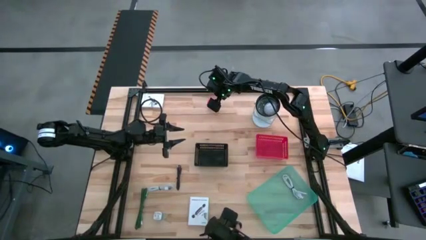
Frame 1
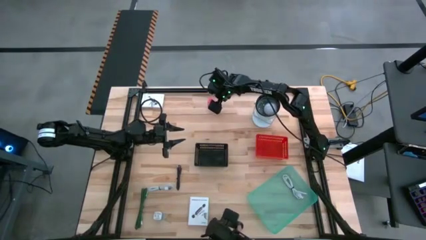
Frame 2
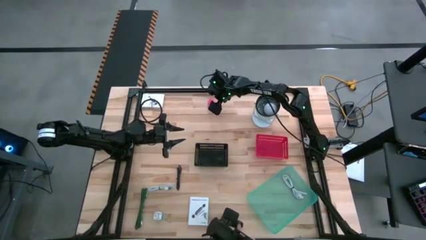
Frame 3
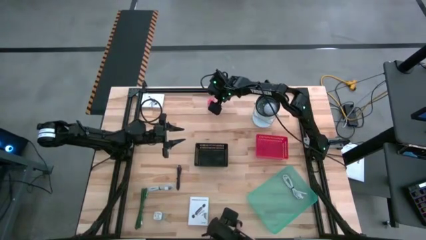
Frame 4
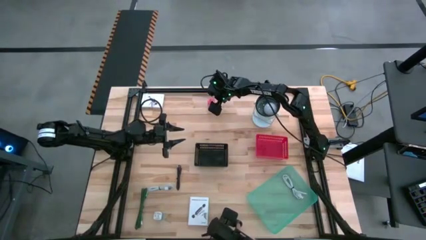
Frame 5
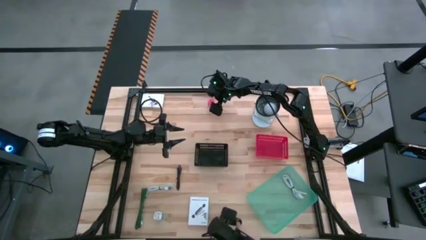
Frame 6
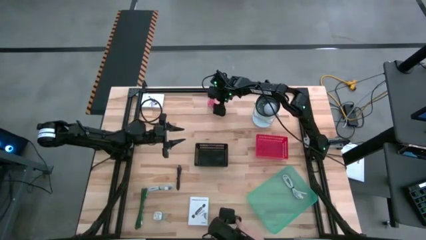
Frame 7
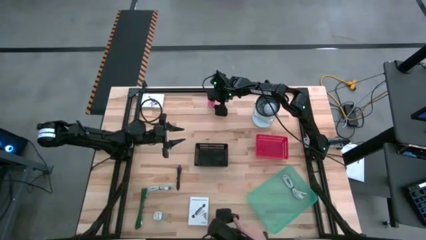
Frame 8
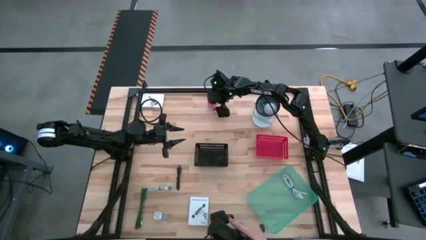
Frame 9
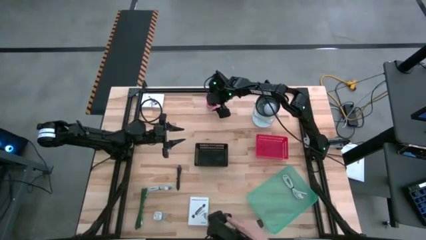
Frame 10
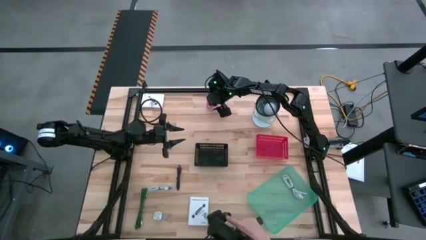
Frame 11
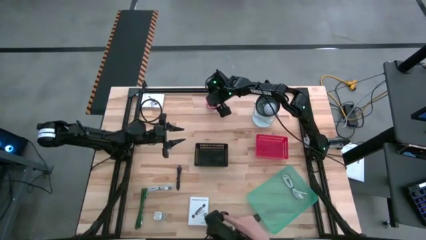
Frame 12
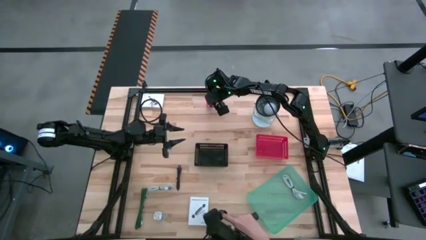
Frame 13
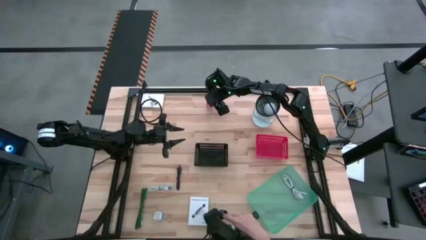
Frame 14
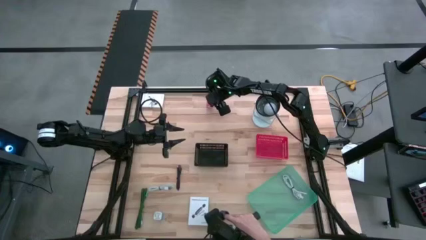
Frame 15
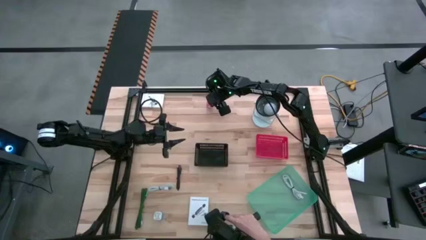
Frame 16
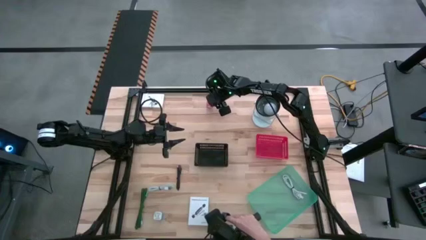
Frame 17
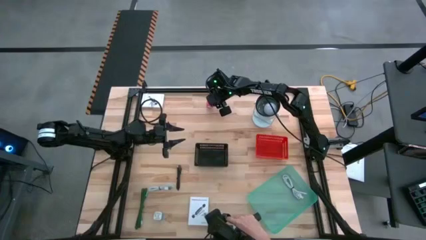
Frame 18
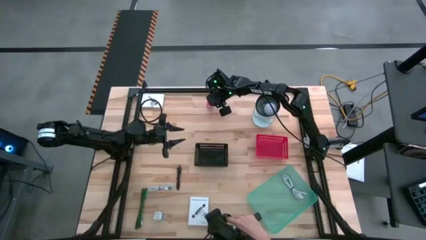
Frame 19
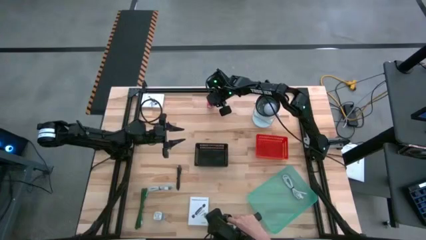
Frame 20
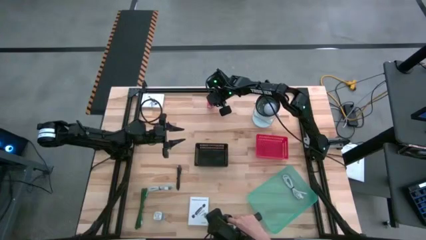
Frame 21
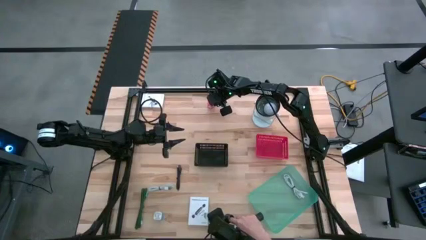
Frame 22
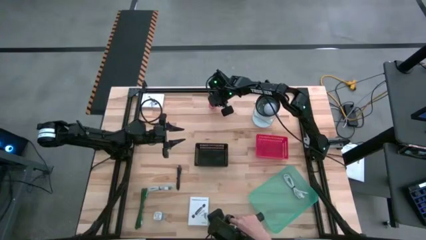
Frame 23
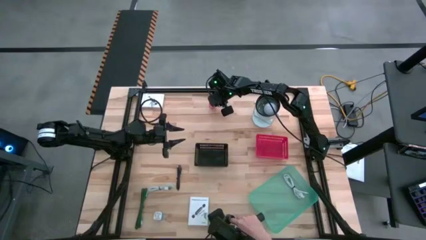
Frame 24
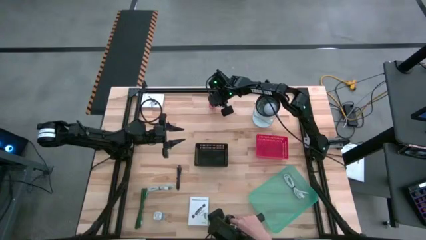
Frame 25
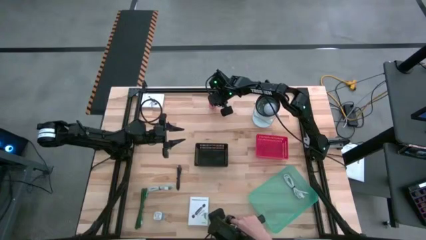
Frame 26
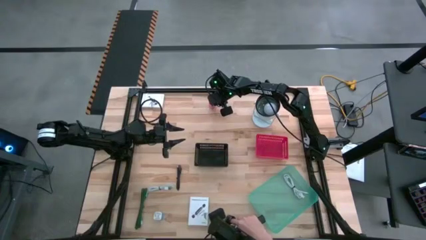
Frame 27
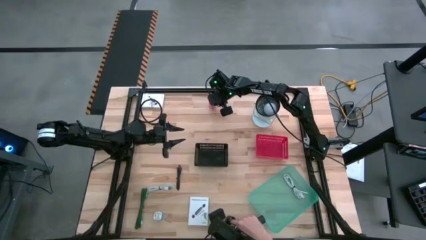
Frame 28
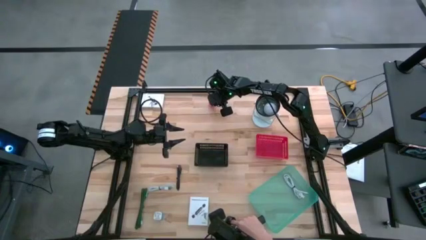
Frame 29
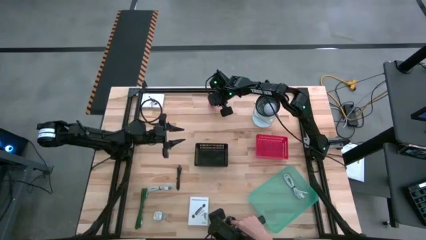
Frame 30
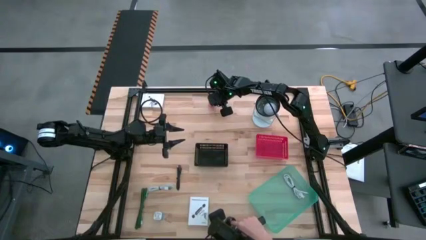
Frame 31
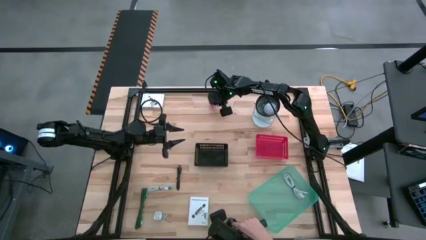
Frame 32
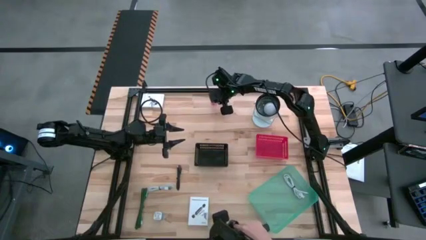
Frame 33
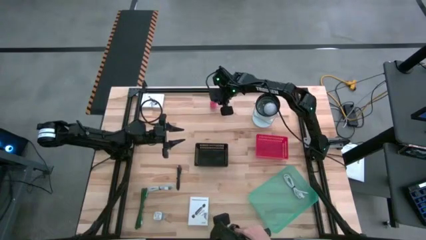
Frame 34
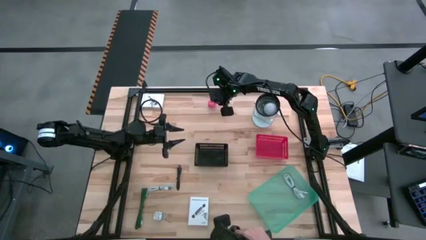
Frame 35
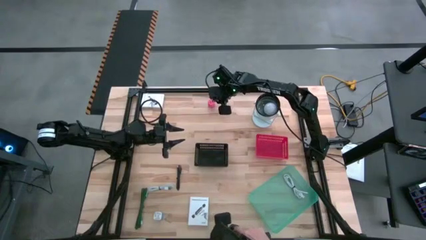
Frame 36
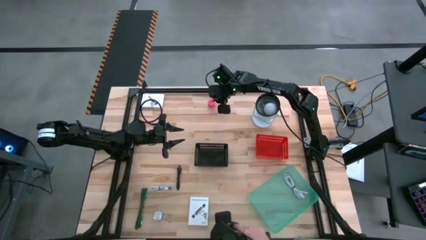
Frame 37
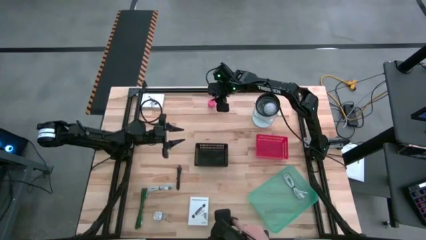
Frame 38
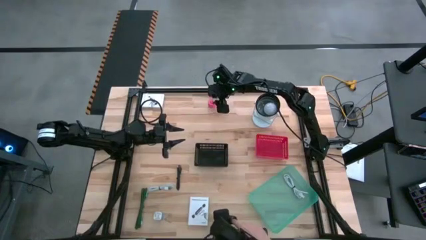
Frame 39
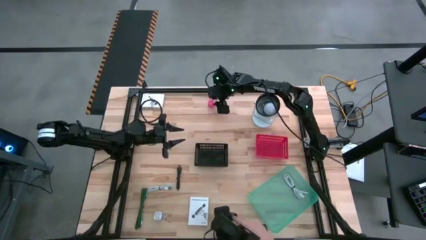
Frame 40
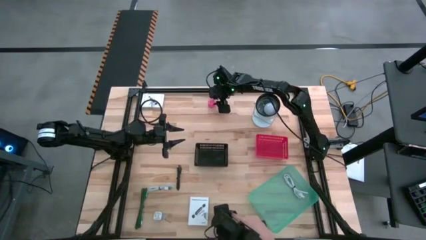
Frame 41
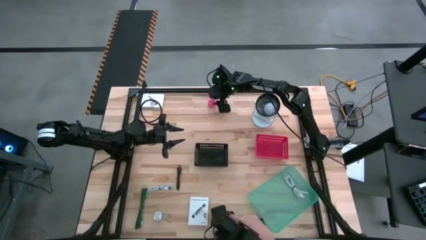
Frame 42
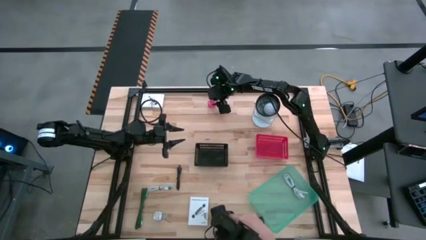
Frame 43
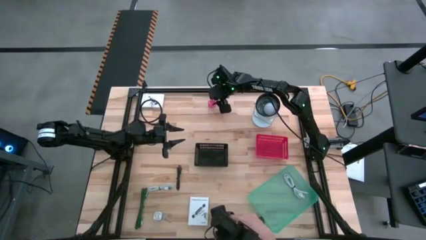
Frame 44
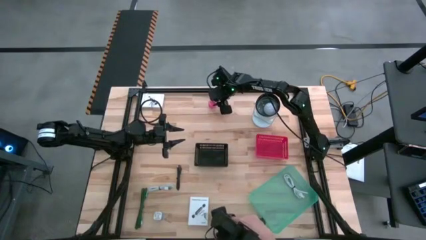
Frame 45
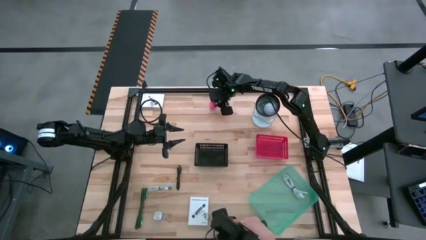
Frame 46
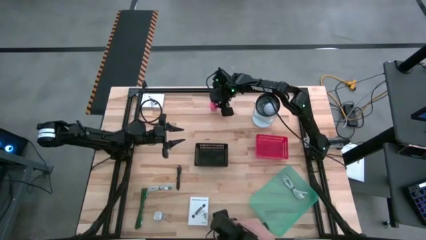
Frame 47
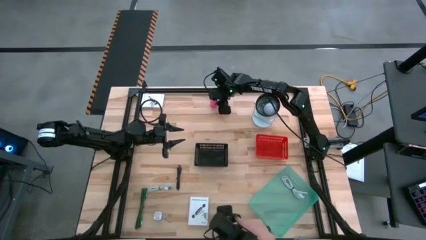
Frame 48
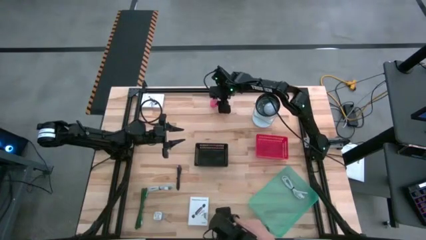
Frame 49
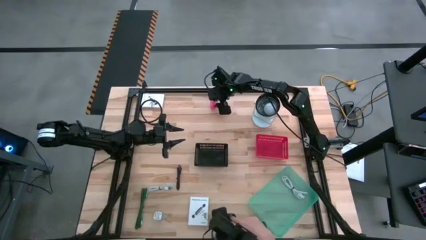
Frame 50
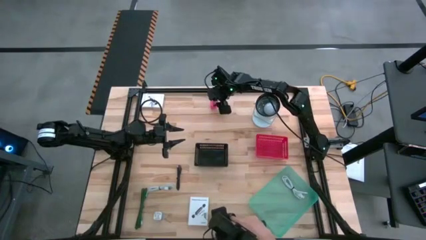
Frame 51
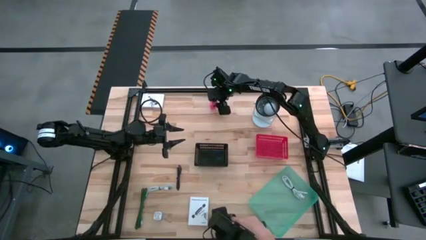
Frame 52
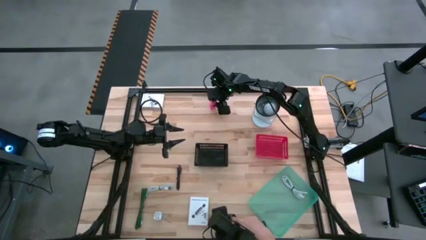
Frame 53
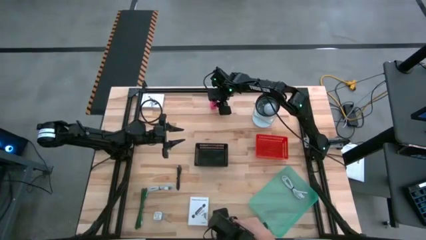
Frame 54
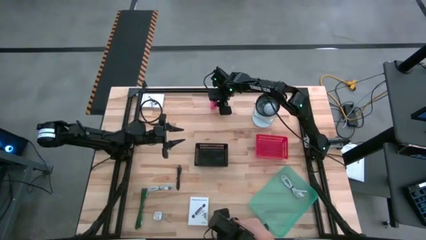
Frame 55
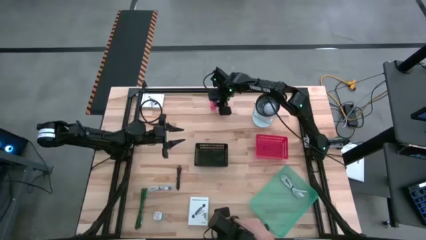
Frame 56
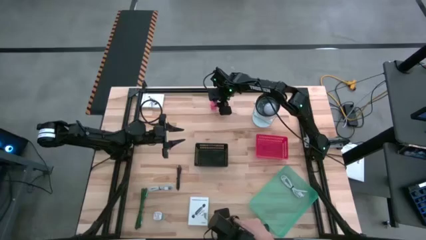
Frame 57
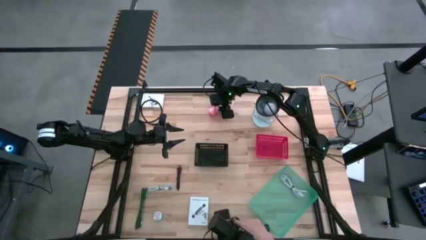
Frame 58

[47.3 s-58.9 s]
Task: Pick and place items into bin
Put the pink charger adapter into the red bin

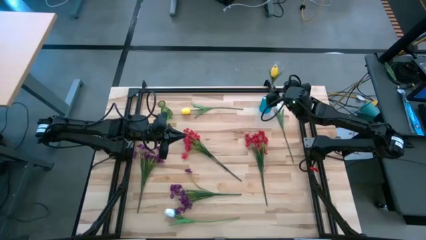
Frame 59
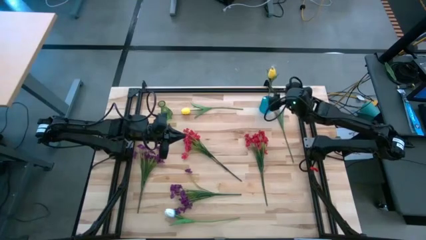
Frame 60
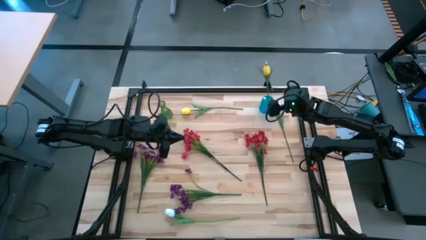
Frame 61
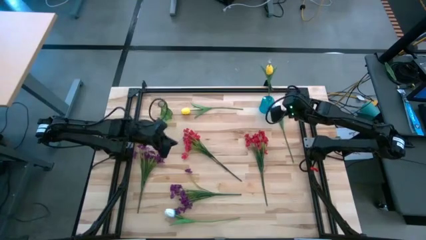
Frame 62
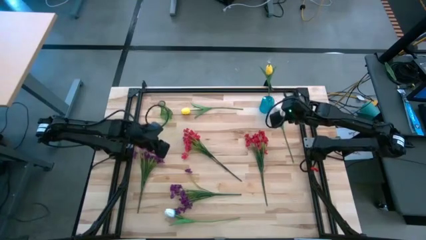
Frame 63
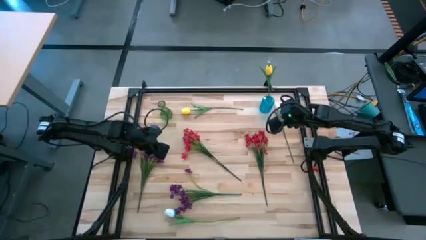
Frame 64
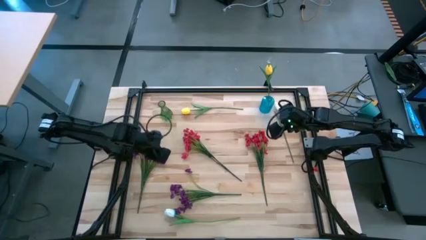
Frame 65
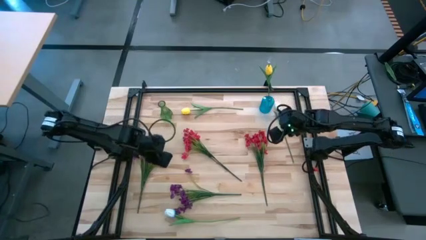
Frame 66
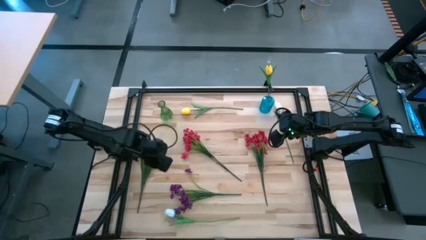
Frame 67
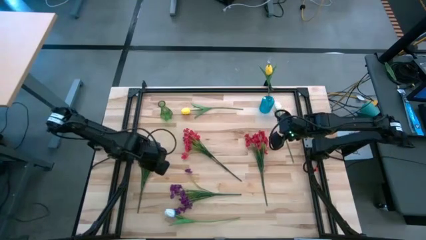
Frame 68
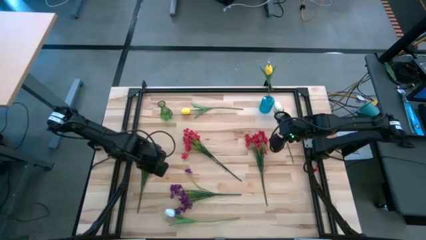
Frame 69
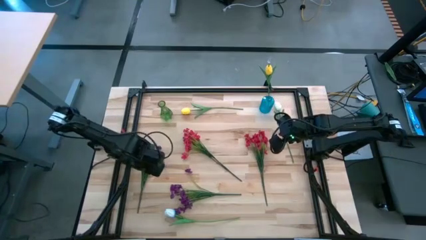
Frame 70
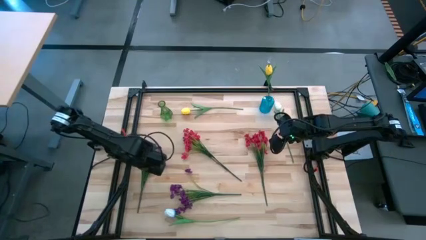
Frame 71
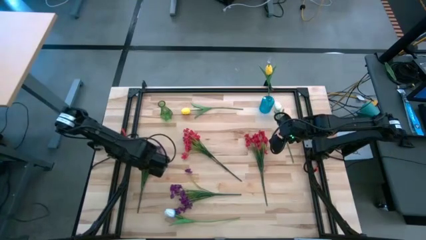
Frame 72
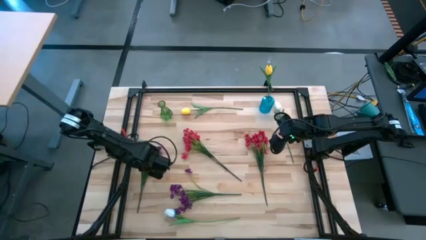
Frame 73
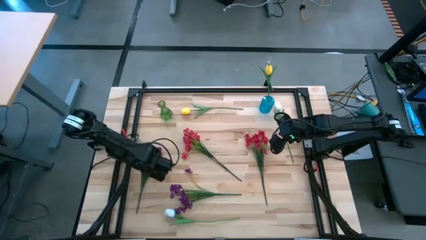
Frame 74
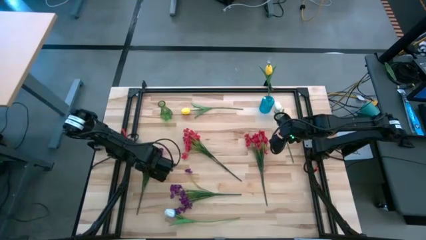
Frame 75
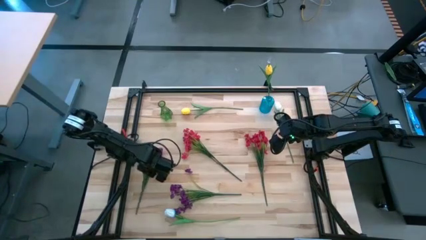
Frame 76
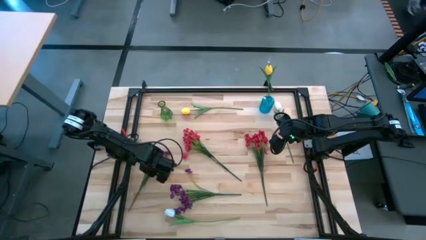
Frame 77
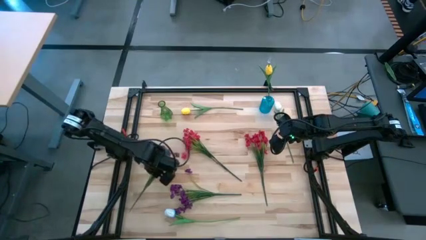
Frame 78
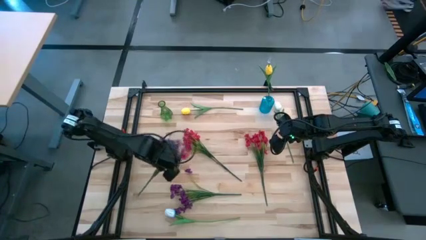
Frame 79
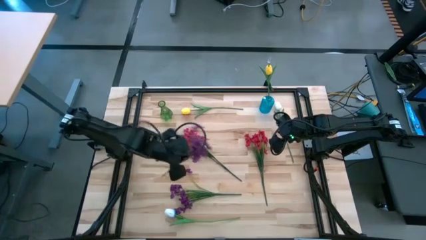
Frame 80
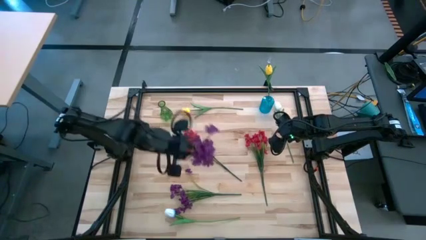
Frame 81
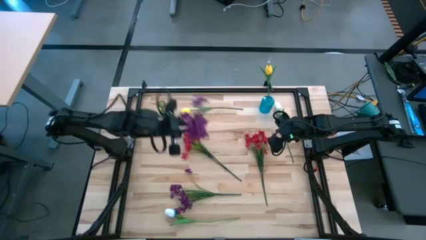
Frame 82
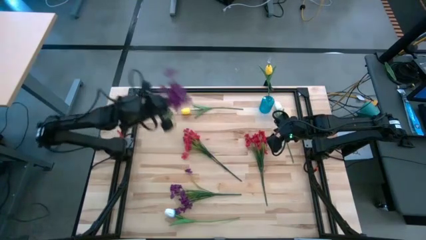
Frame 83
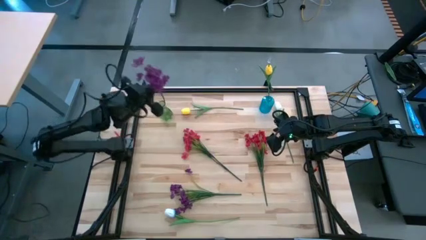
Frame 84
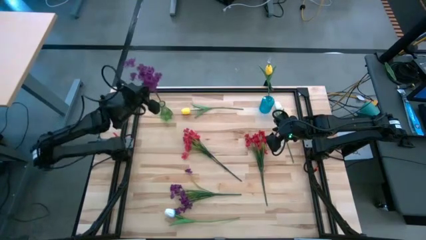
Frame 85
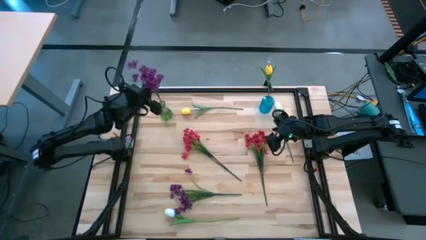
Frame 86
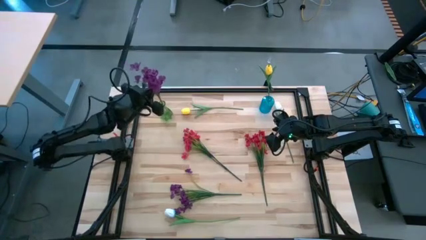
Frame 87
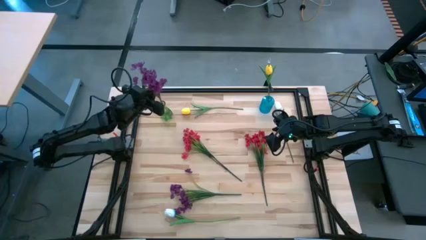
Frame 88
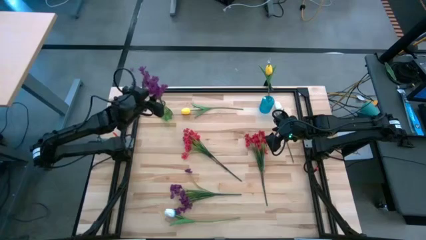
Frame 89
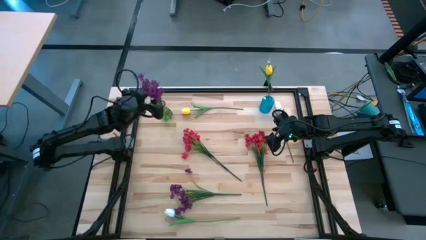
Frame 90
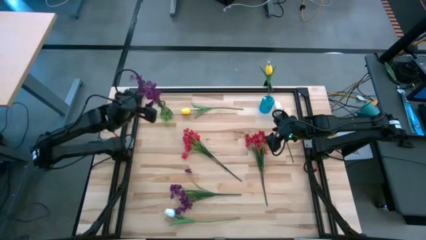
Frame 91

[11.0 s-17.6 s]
Task: Sort flowers into vase by color
Put the left violet flowers into the green vase
